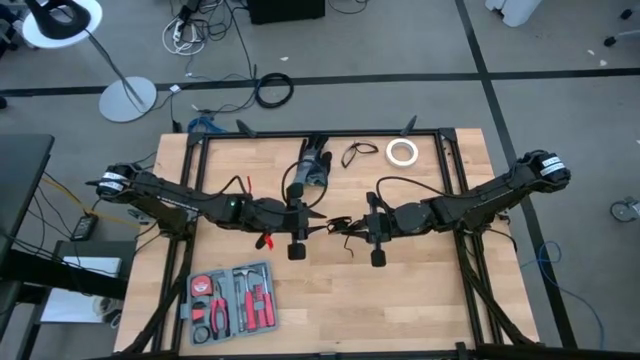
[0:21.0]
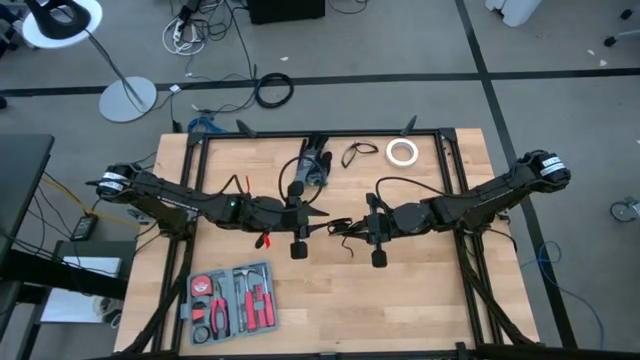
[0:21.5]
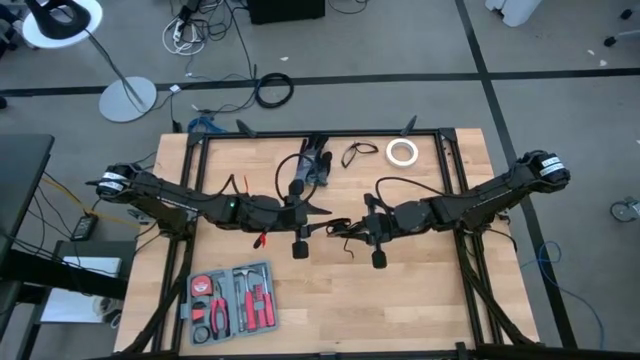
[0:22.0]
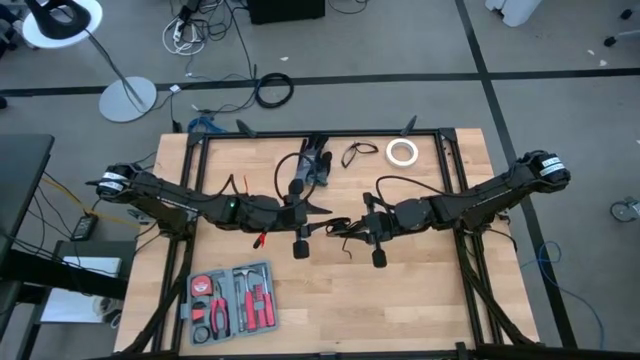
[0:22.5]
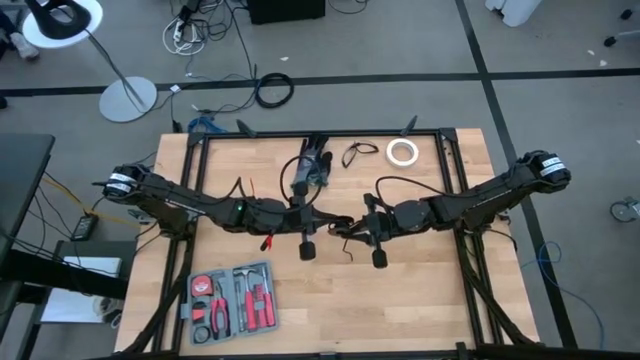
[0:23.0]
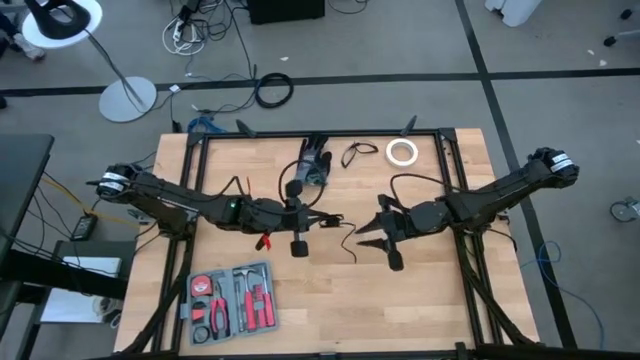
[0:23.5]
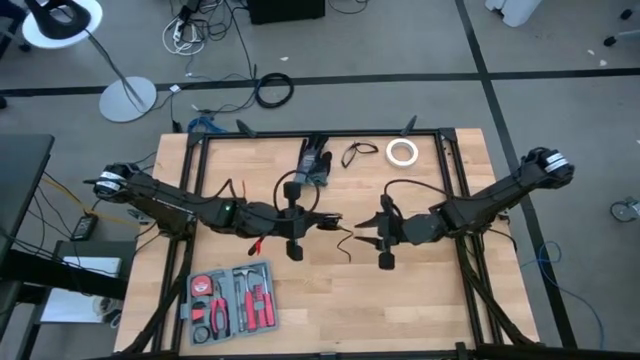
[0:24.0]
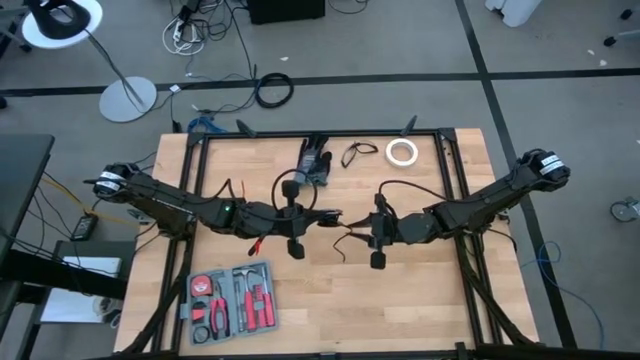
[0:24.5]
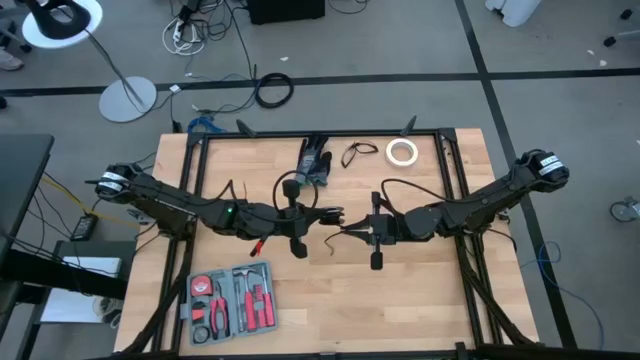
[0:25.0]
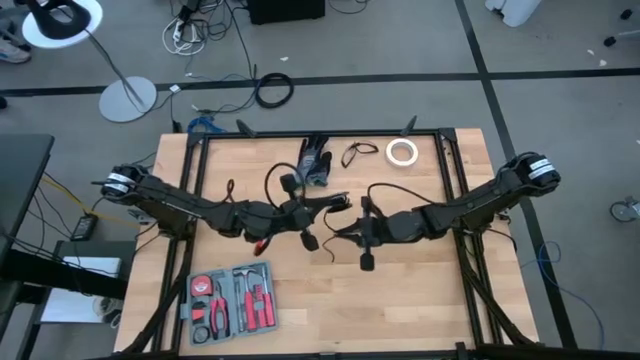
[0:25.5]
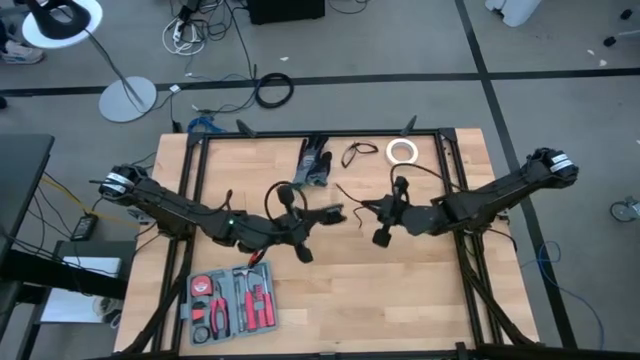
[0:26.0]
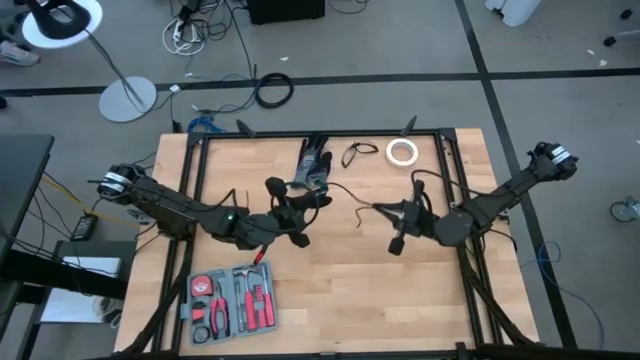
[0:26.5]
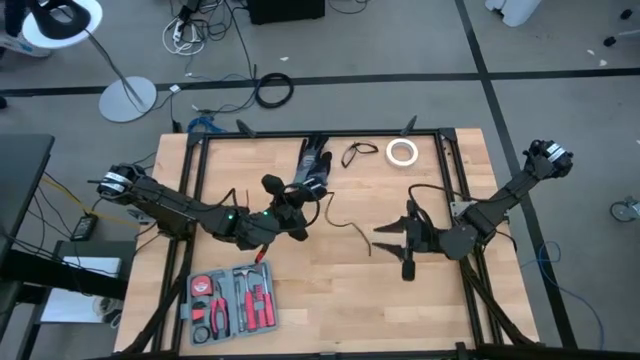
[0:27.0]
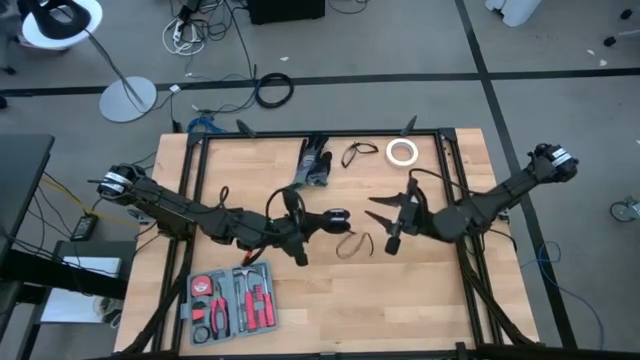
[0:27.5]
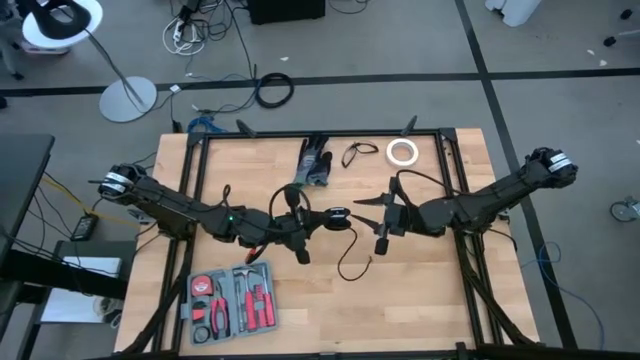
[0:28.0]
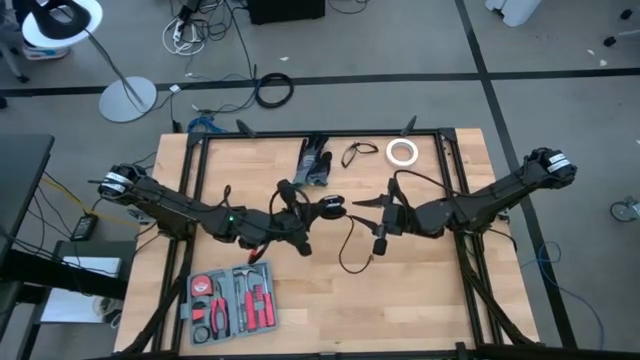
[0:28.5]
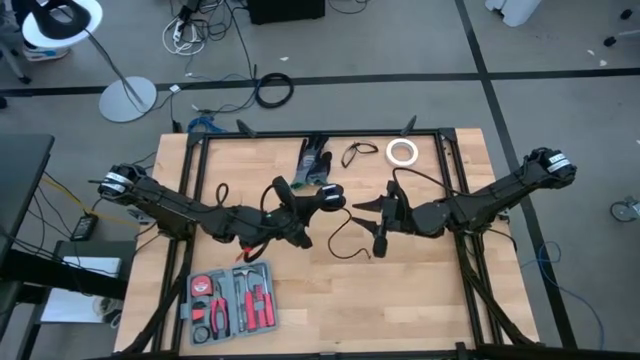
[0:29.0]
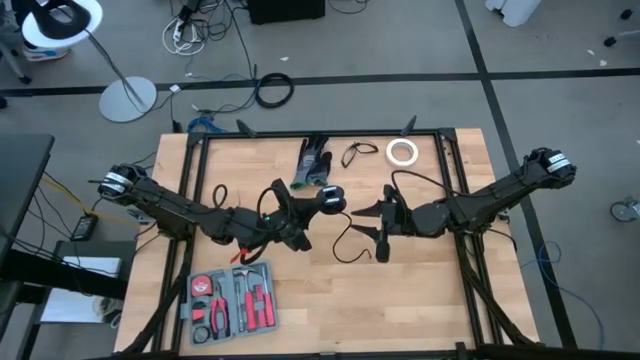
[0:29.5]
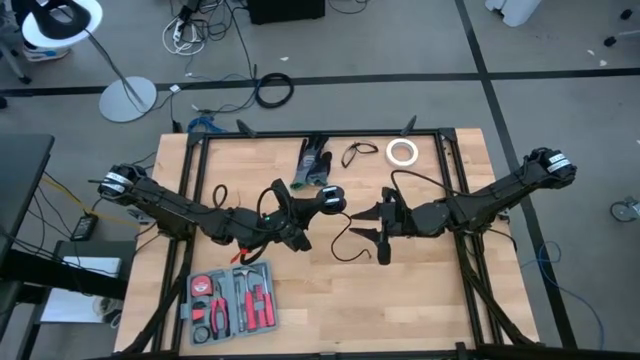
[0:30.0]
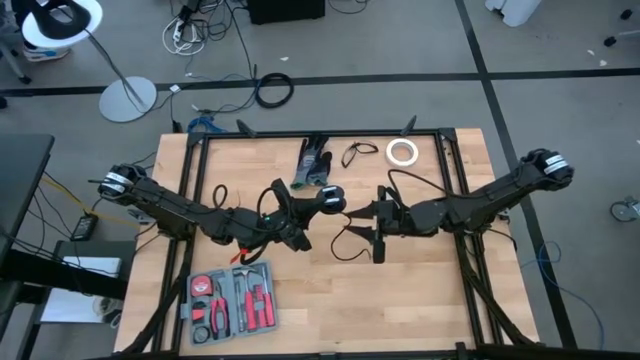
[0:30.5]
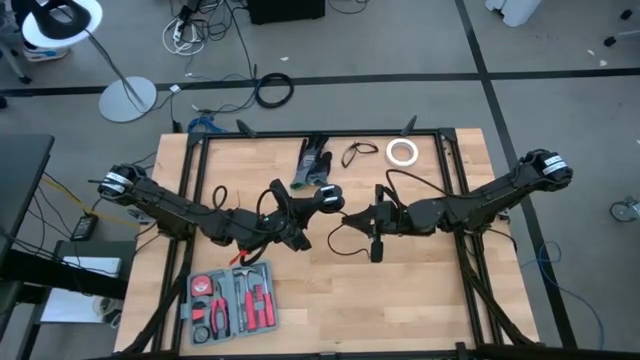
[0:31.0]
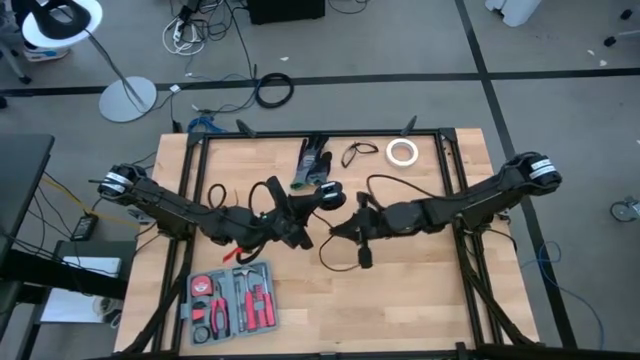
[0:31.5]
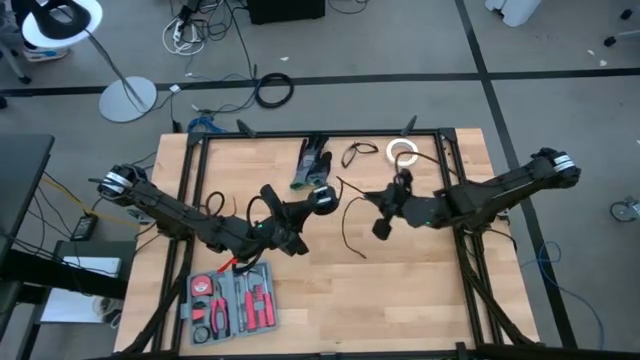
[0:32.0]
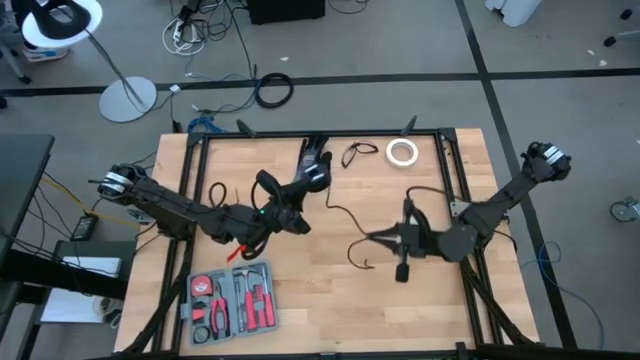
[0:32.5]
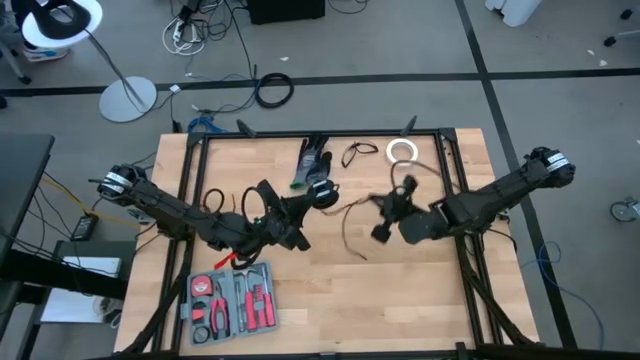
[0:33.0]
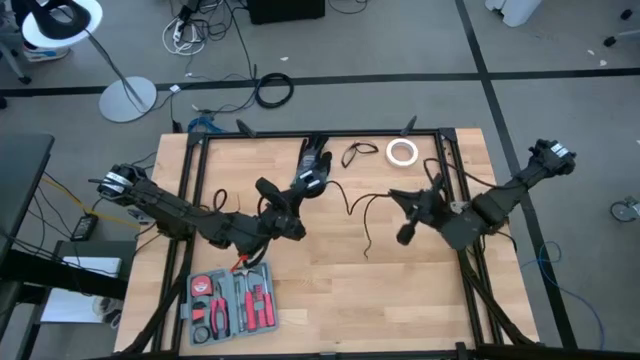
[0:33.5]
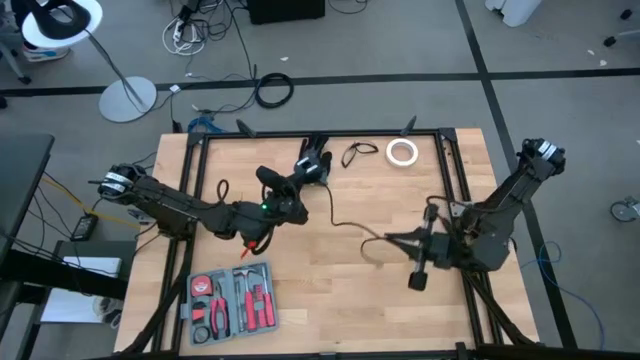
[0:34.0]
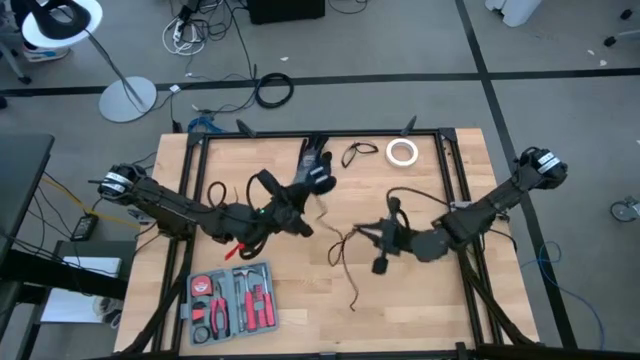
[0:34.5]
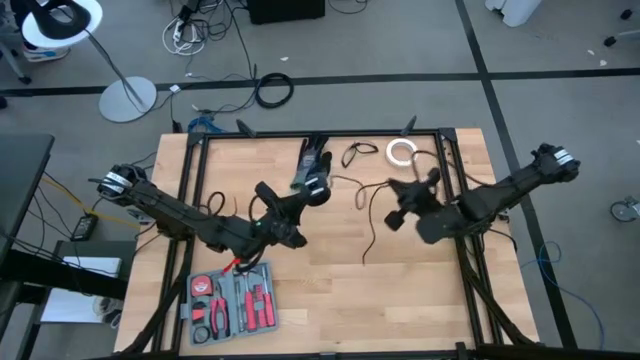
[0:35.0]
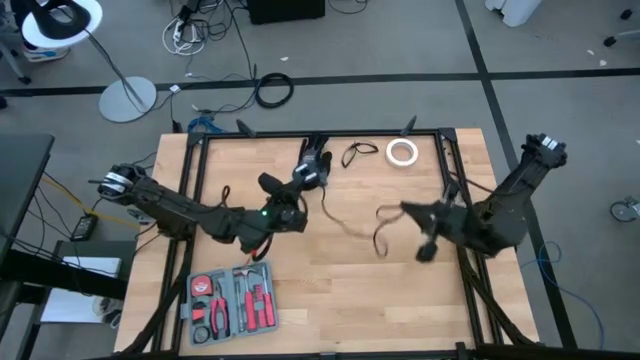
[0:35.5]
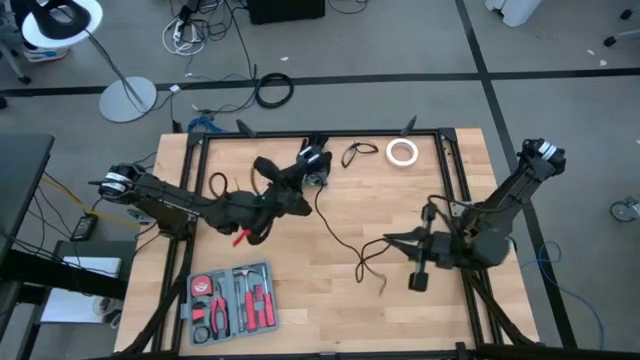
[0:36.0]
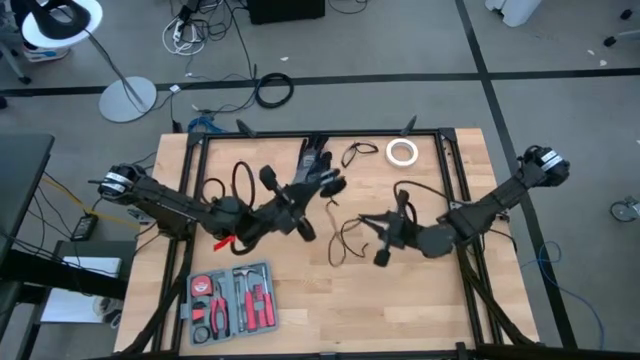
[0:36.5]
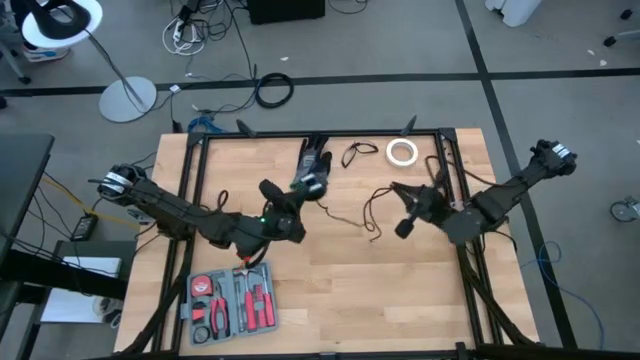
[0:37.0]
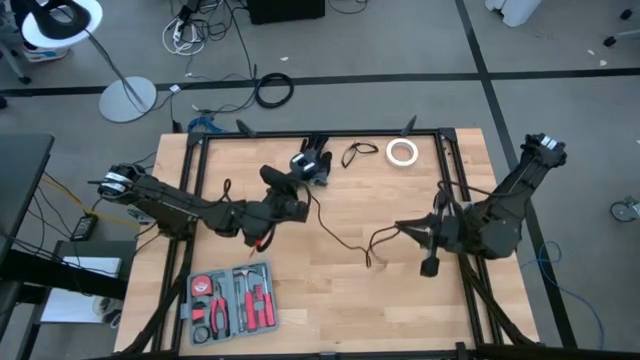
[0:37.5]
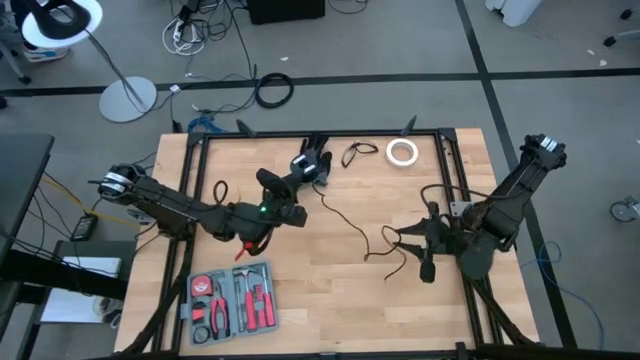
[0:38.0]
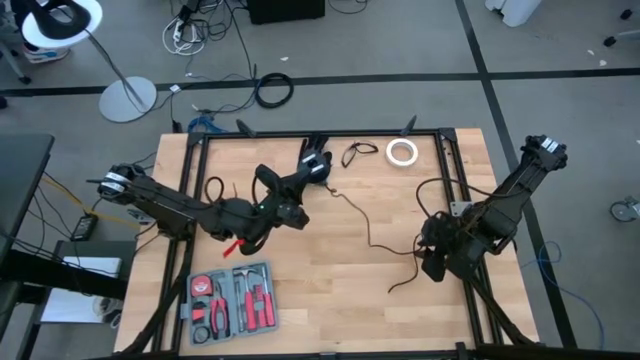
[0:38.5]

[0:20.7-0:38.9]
Task: Coil cords
Uncoil the black wire from the spool

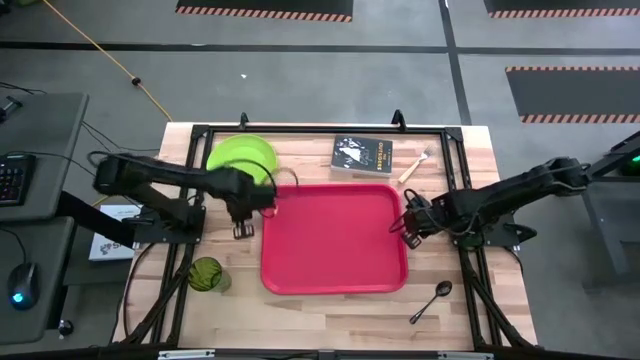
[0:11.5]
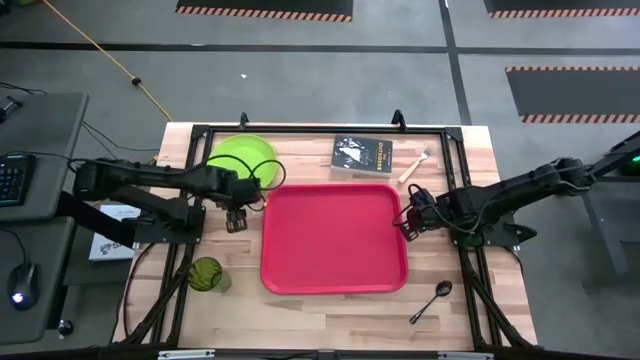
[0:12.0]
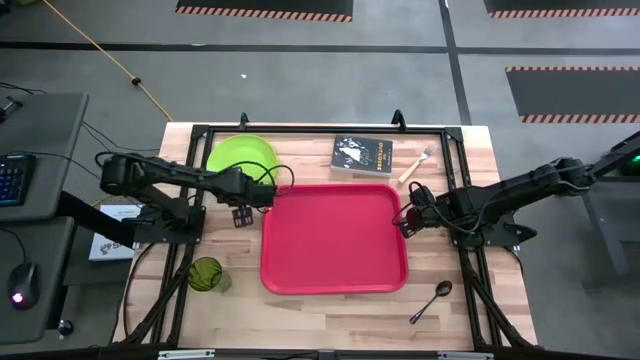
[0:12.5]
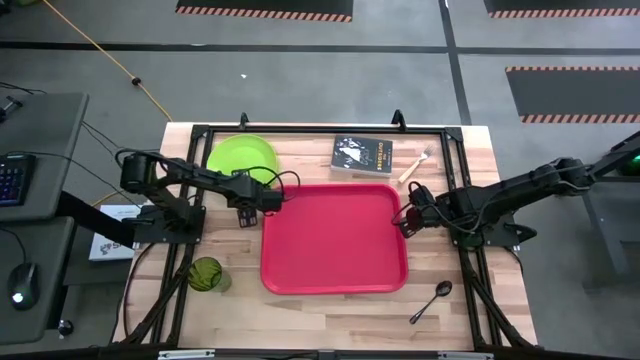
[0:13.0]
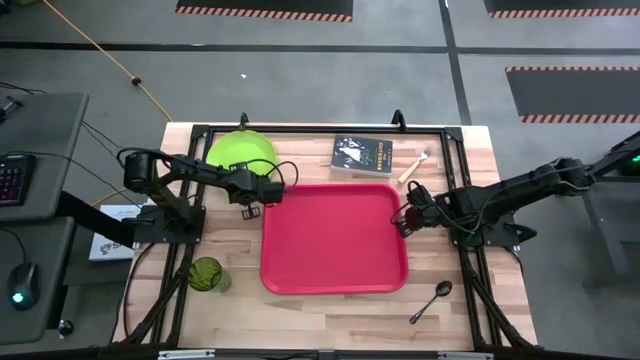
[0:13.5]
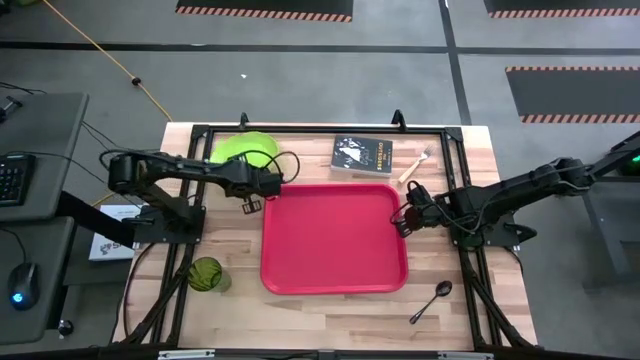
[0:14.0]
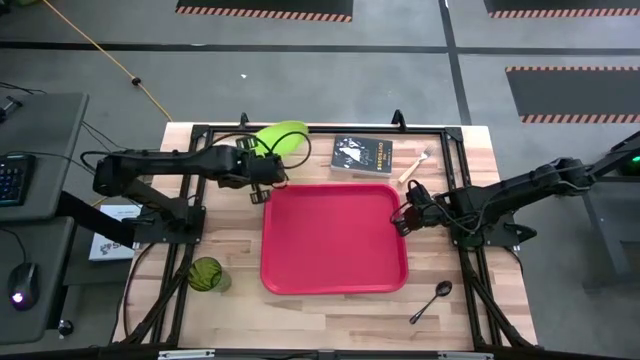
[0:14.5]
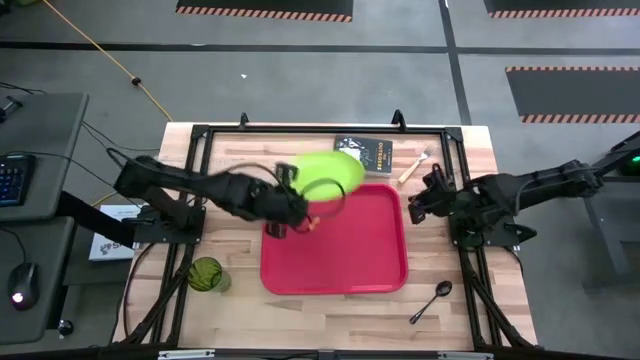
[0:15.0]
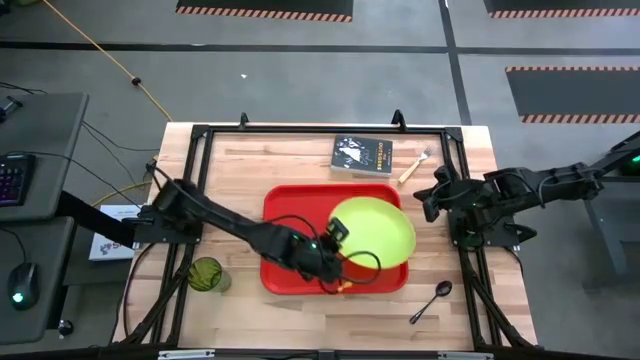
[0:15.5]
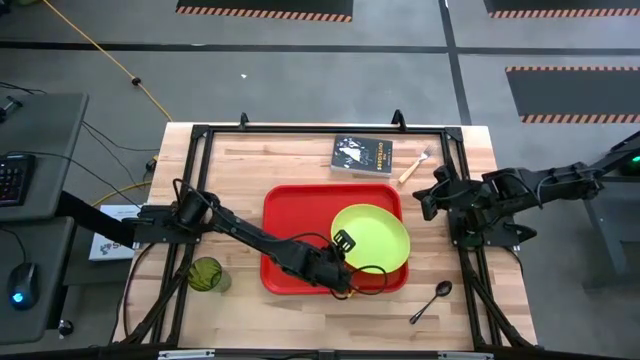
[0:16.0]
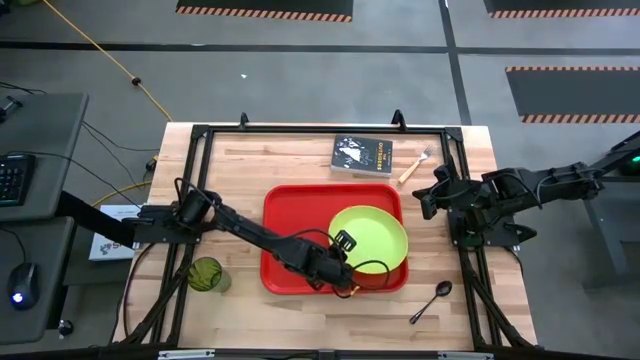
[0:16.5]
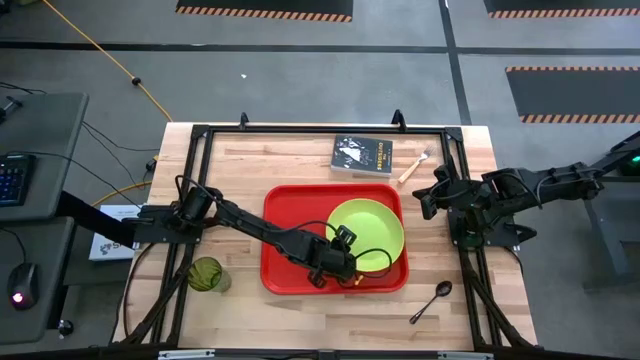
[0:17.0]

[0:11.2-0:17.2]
Task: Pick and place plate/cup/fork/spoon on tray
Put the green plate on the red serving tray
